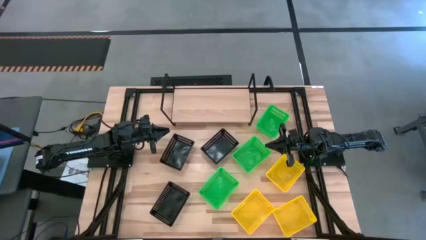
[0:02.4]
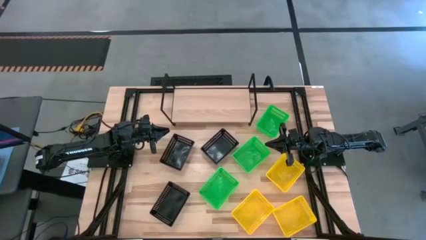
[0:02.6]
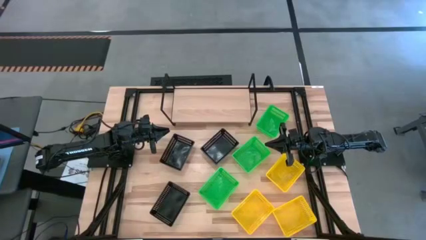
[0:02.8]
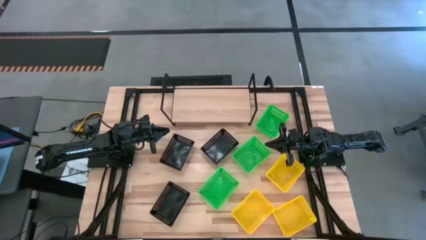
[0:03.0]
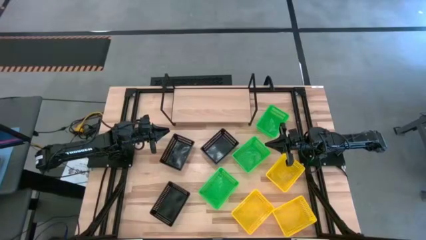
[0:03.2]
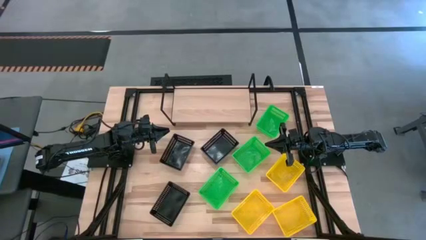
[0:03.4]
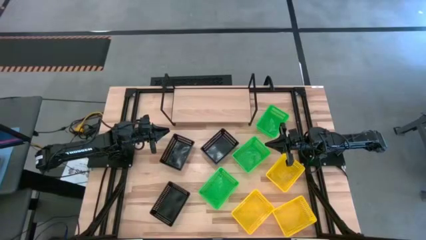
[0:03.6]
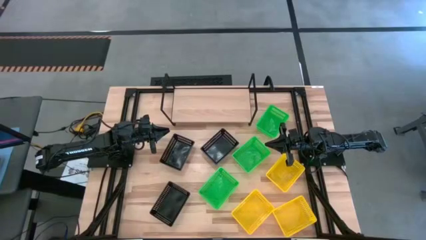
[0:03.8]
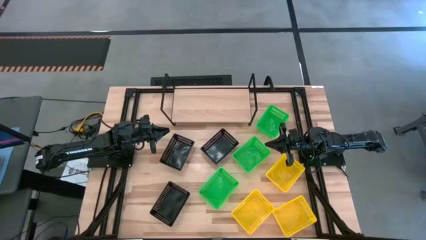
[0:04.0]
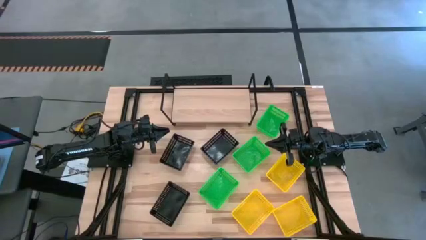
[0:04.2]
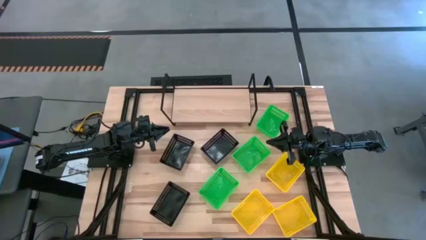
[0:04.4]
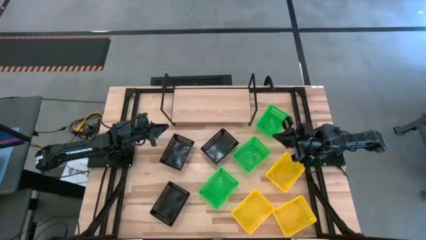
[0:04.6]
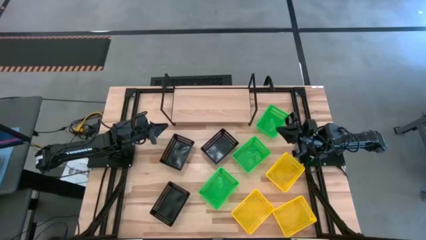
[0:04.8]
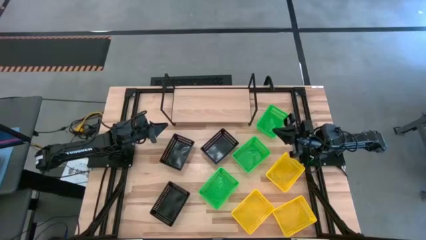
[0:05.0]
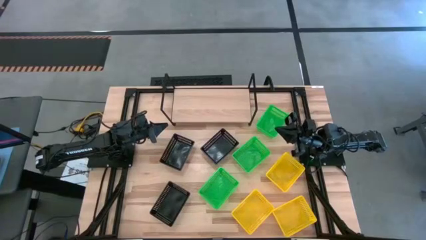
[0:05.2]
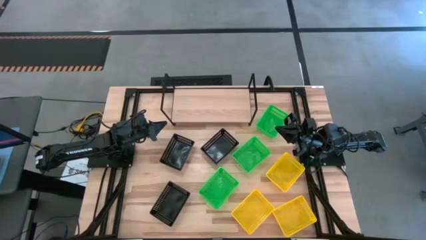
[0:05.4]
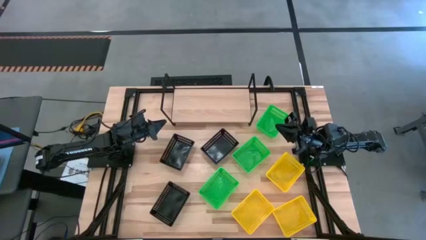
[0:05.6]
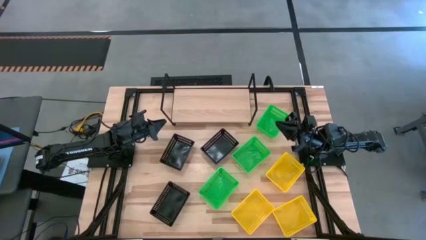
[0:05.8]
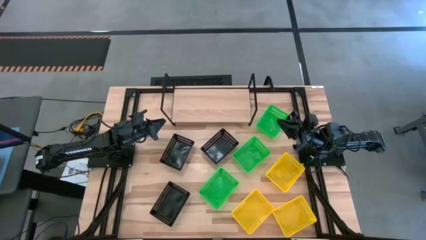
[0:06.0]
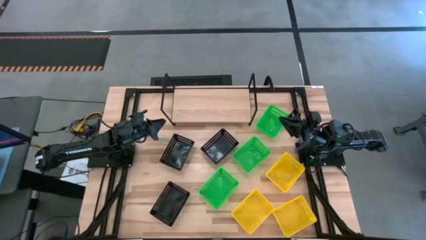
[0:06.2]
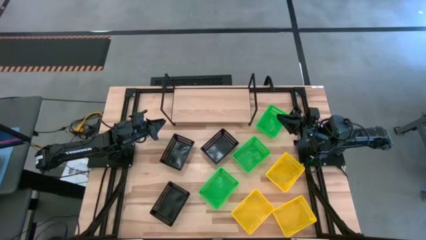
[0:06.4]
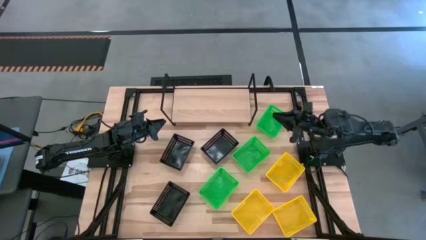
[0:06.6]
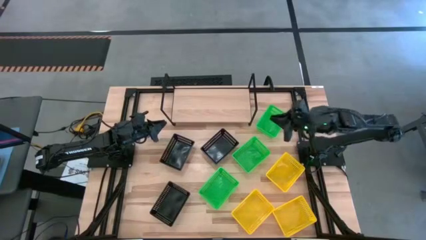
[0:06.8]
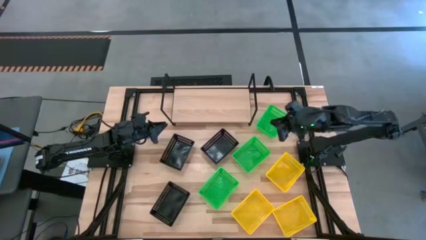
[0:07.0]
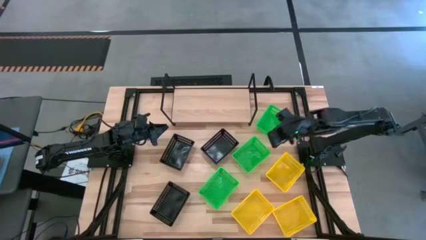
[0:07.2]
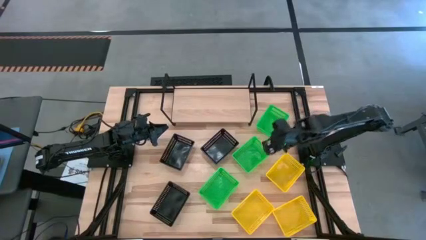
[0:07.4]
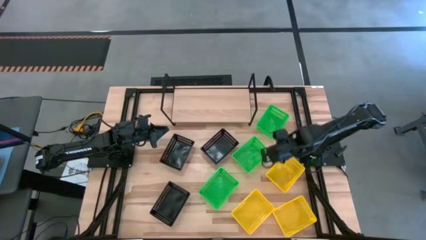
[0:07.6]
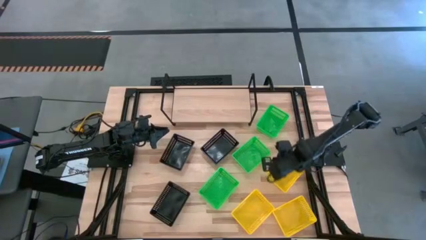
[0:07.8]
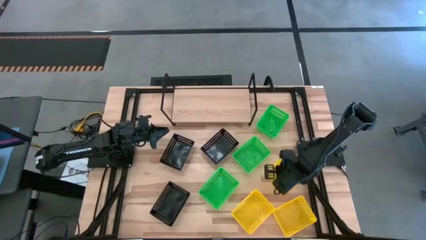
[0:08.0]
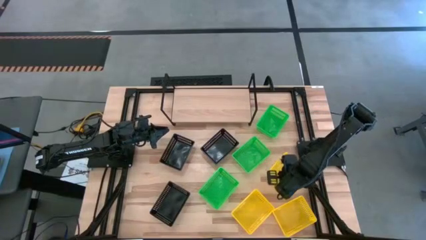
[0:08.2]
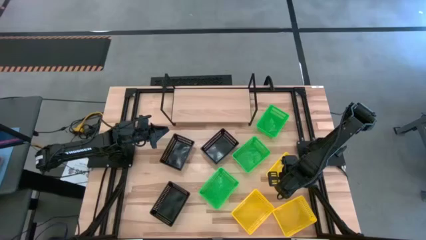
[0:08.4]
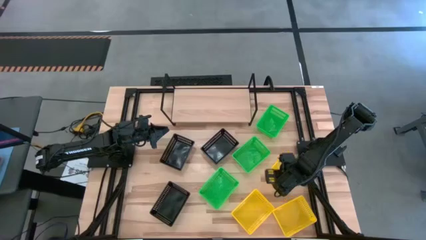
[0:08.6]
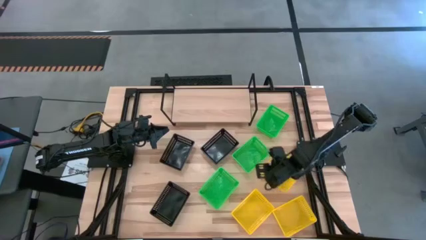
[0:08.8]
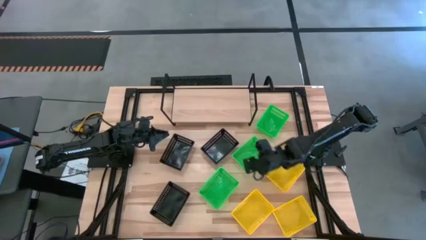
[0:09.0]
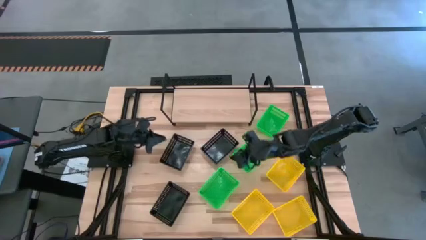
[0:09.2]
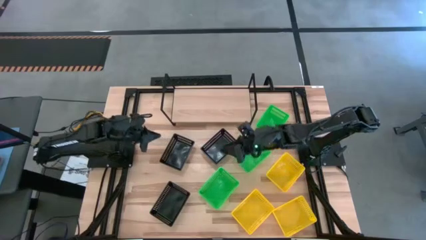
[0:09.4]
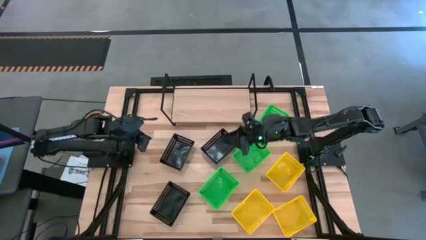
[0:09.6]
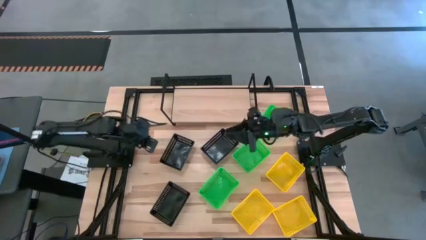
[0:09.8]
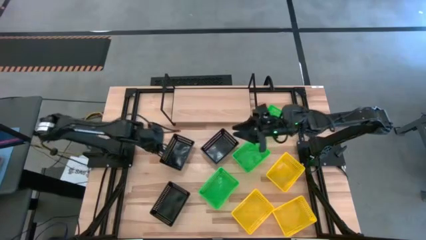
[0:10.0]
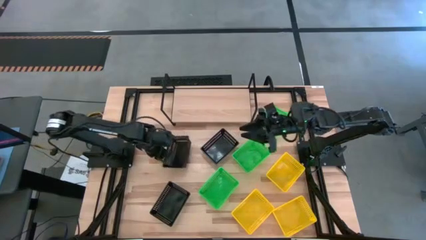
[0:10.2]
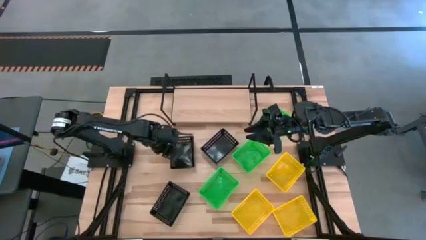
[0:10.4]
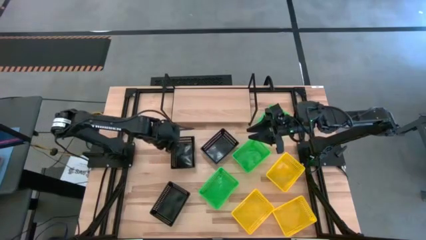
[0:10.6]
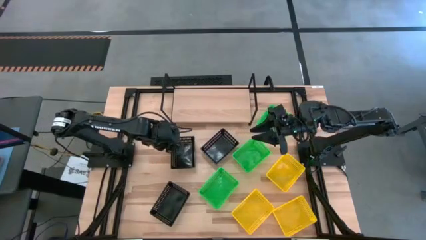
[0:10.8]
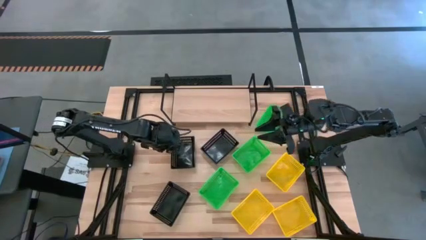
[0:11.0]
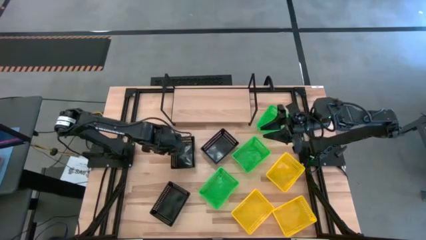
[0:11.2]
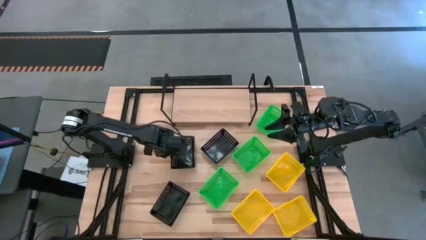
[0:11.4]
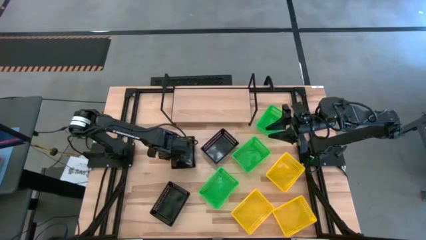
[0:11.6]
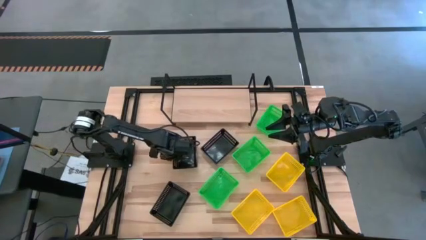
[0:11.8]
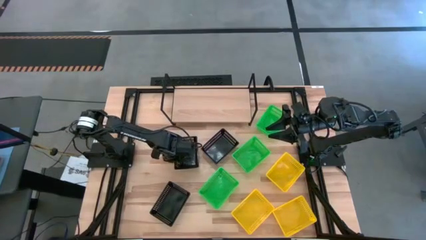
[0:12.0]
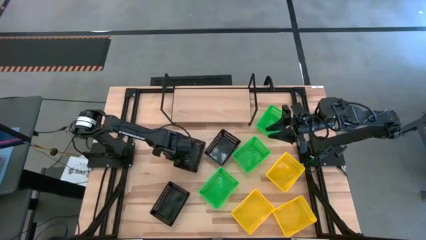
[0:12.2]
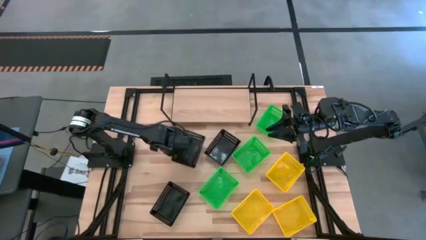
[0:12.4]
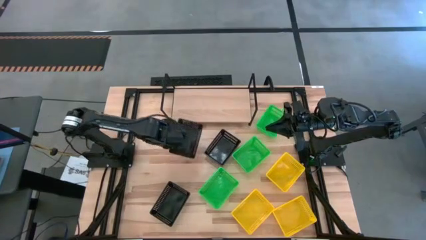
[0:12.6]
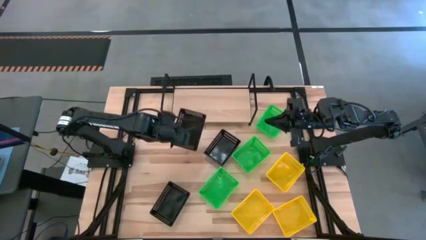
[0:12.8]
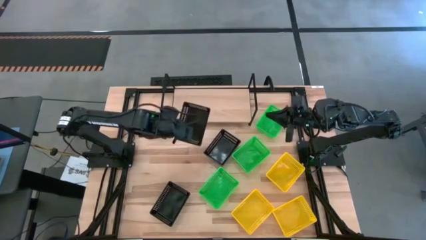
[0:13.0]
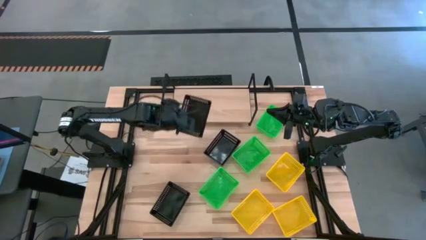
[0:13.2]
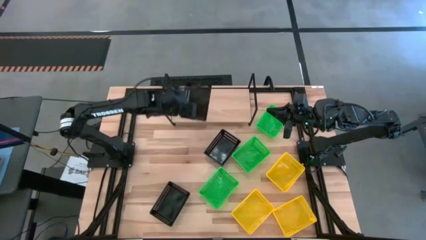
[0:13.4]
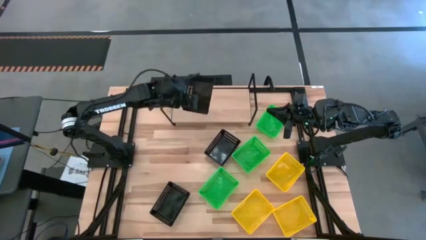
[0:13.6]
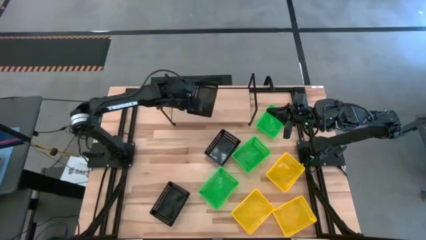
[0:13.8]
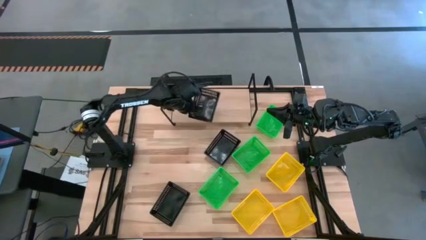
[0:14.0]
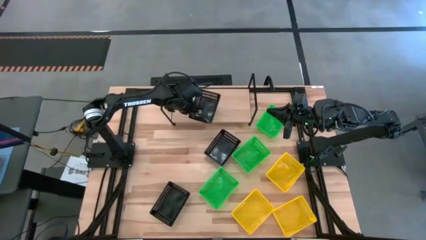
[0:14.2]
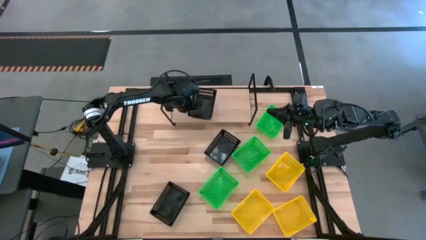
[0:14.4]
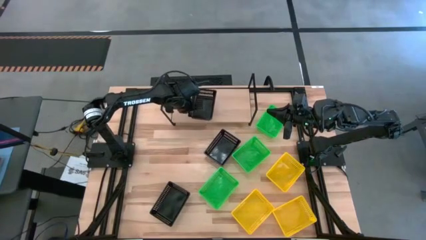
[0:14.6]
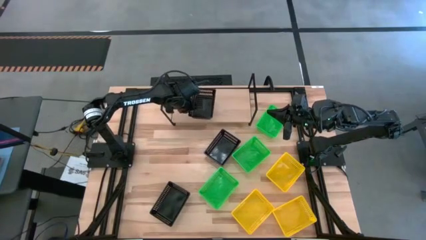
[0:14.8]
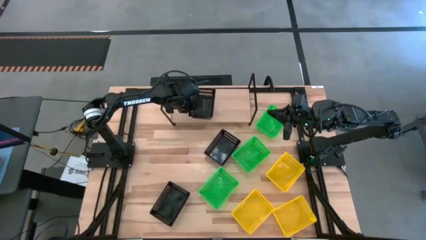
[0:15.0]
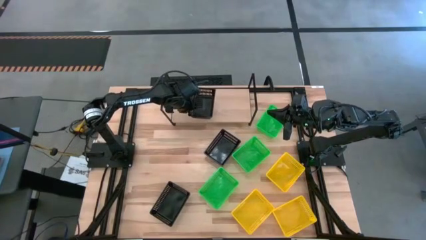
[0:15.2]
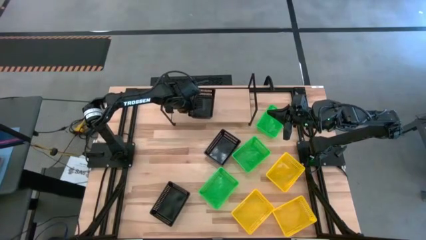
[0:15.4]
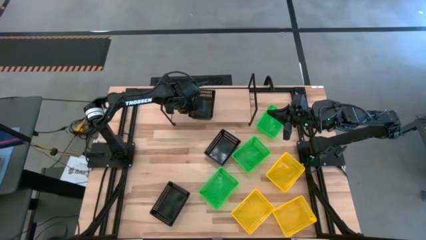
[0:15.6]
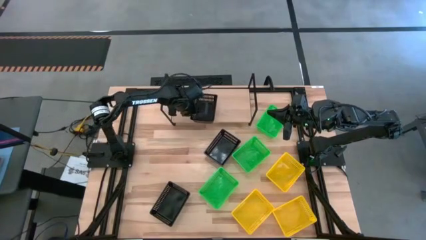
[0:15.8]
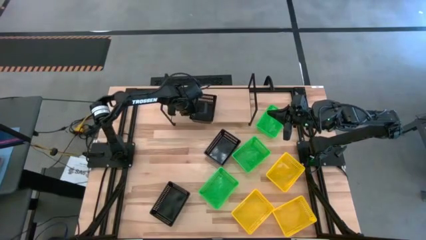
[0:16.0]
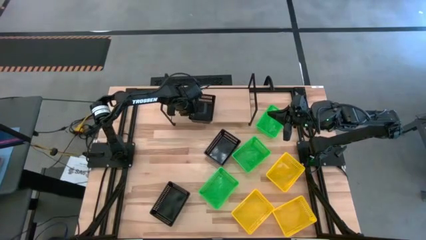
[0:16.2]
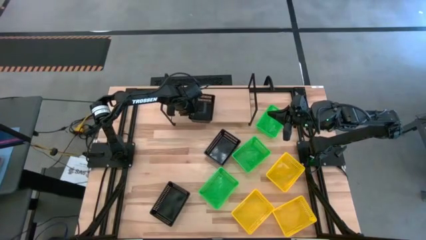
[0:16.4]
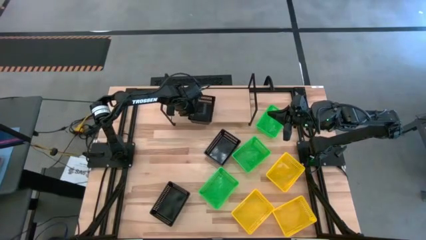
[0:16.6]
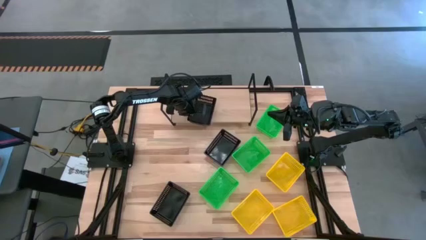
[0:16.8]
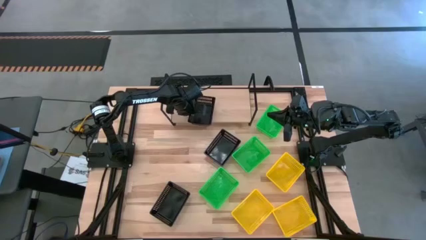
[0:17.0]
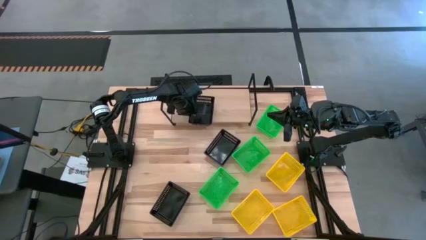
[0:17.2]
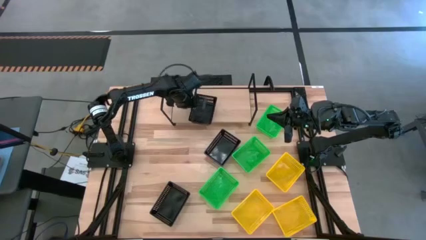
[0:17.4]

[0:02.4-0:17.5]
Task: Stack baskets on shelf by color
Put the top left black bin on the shelf
